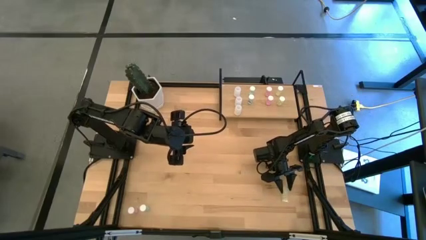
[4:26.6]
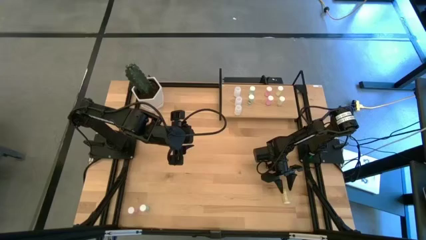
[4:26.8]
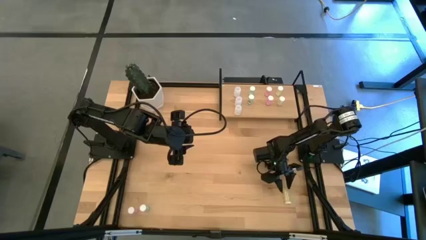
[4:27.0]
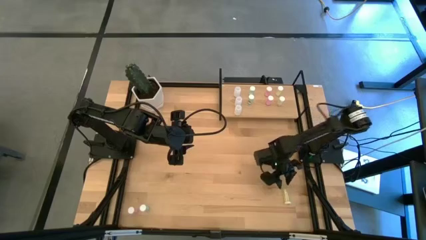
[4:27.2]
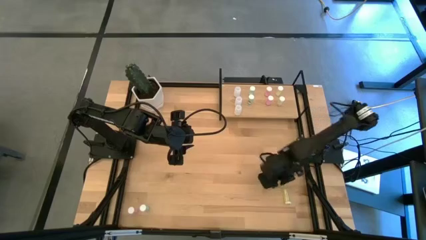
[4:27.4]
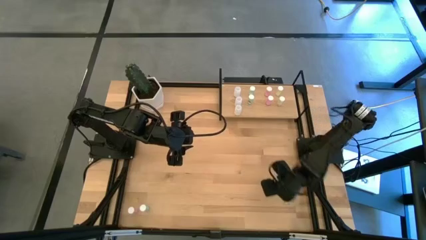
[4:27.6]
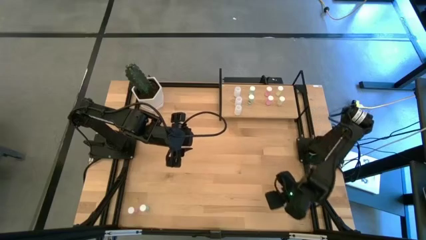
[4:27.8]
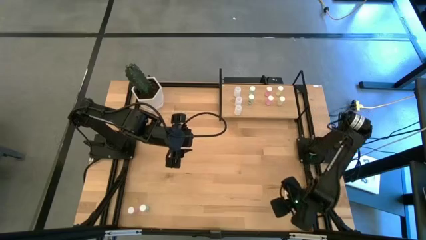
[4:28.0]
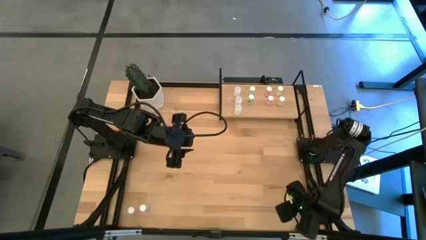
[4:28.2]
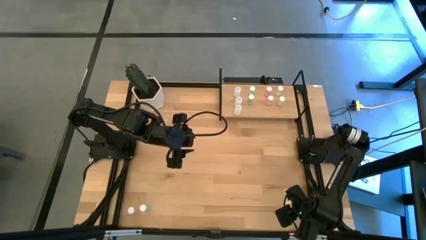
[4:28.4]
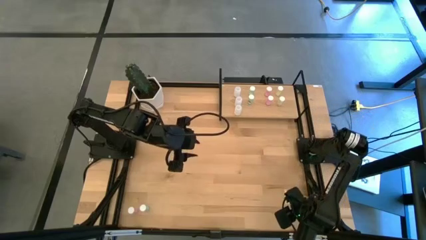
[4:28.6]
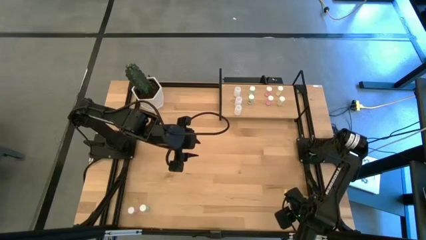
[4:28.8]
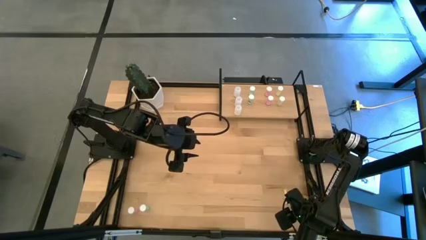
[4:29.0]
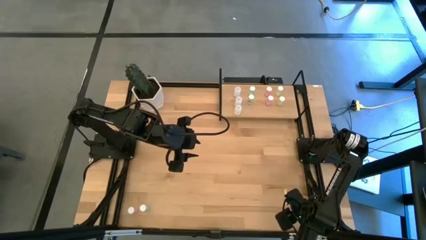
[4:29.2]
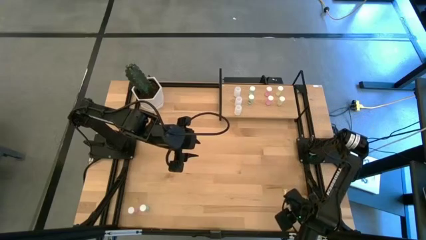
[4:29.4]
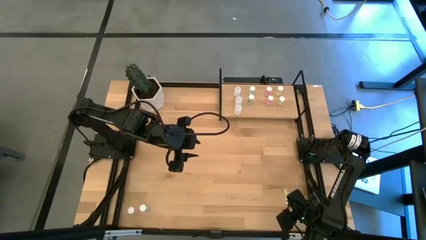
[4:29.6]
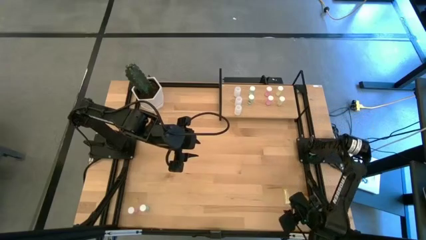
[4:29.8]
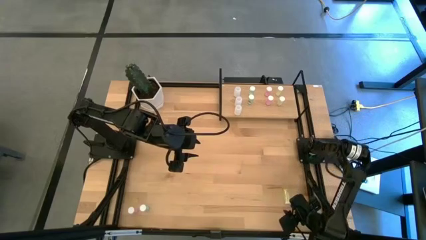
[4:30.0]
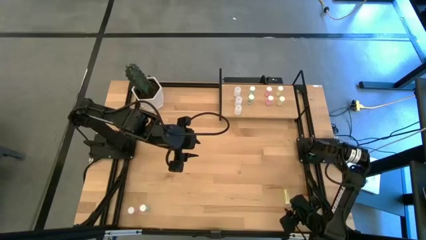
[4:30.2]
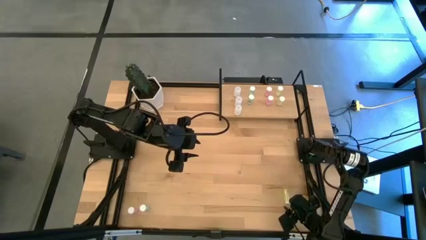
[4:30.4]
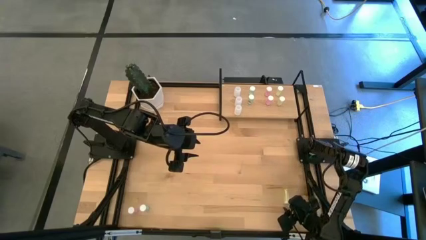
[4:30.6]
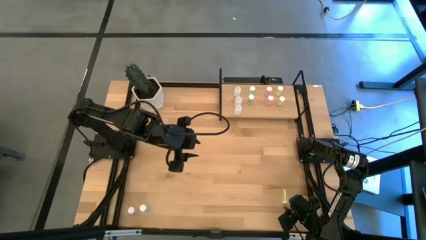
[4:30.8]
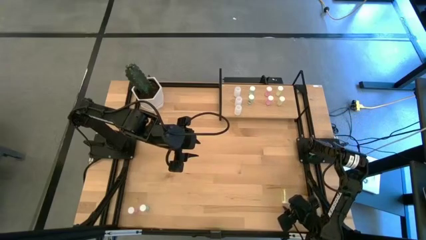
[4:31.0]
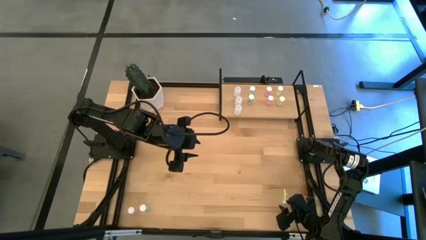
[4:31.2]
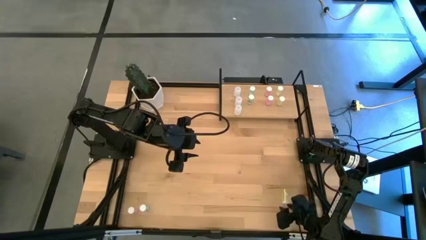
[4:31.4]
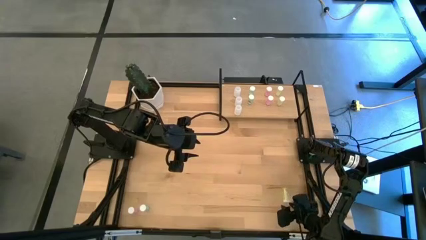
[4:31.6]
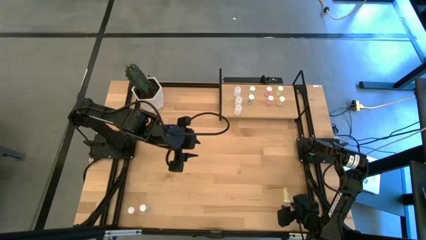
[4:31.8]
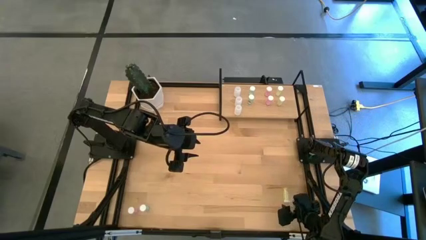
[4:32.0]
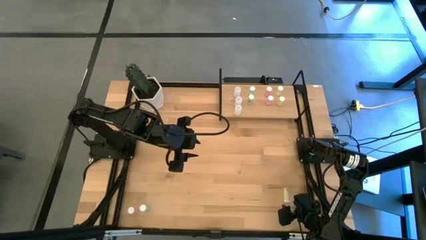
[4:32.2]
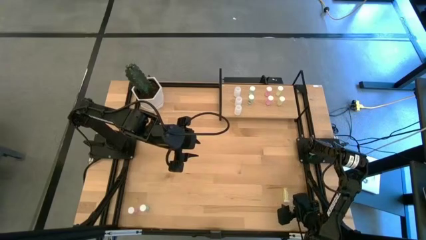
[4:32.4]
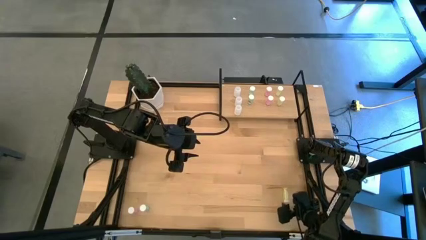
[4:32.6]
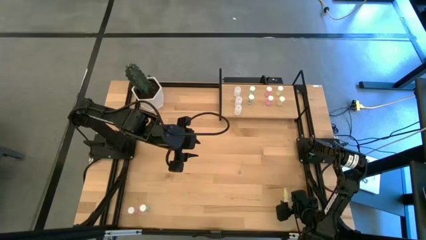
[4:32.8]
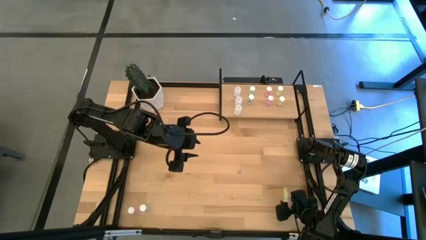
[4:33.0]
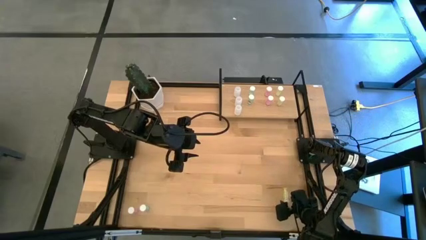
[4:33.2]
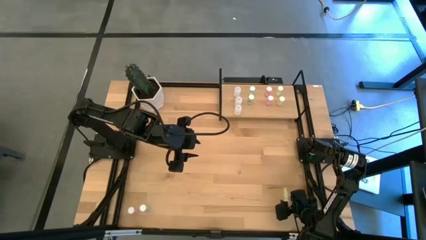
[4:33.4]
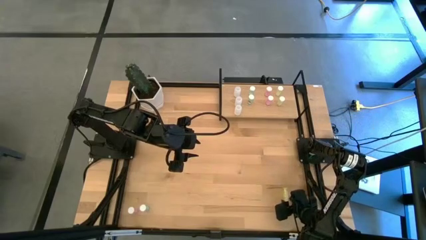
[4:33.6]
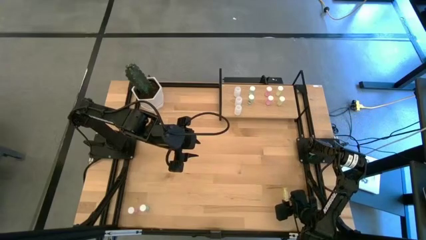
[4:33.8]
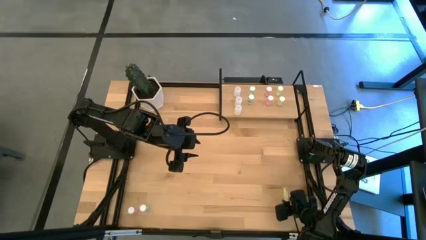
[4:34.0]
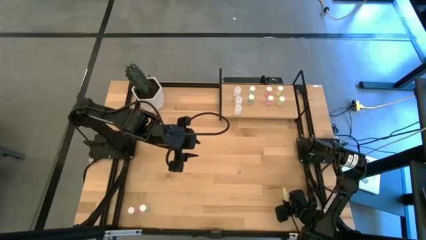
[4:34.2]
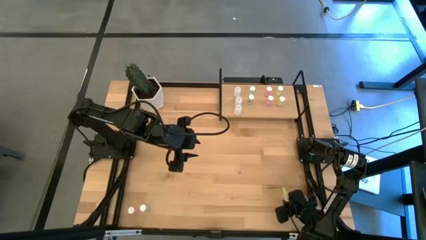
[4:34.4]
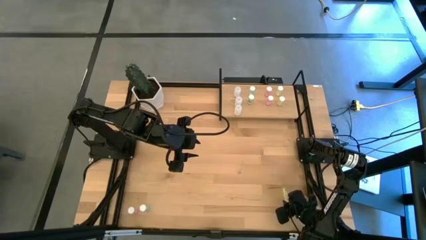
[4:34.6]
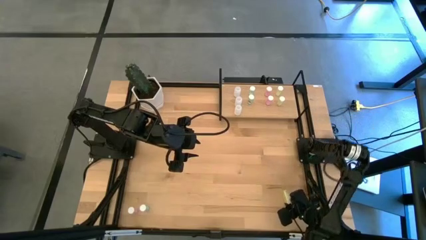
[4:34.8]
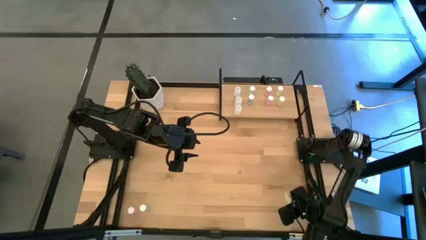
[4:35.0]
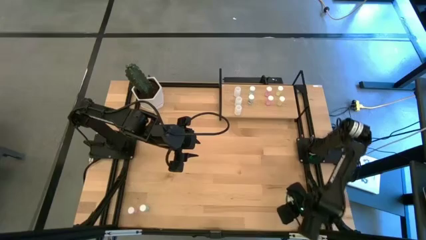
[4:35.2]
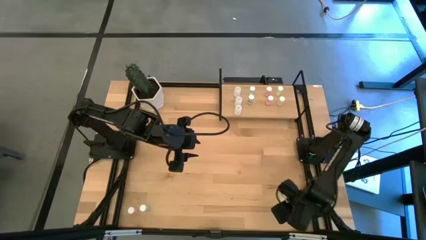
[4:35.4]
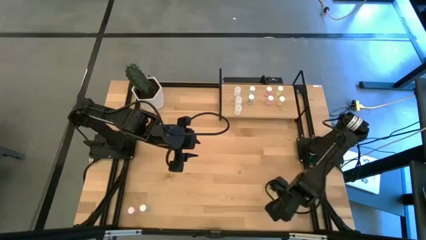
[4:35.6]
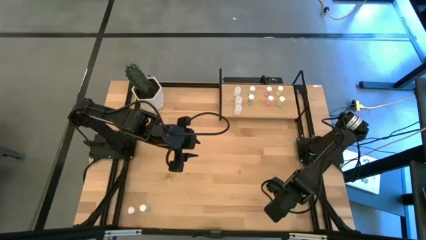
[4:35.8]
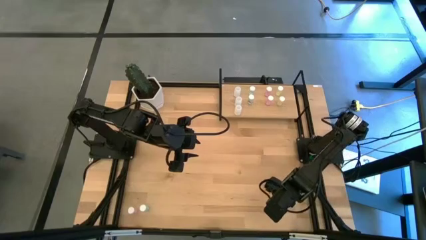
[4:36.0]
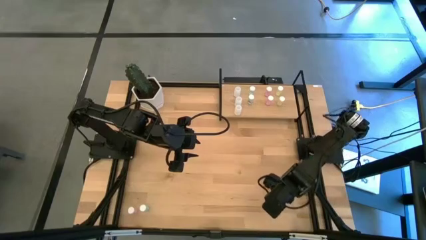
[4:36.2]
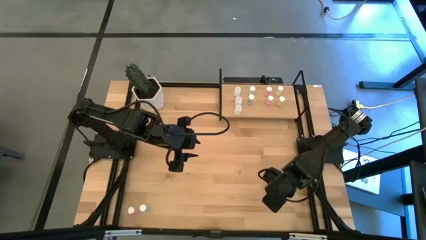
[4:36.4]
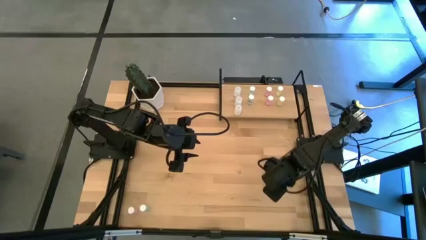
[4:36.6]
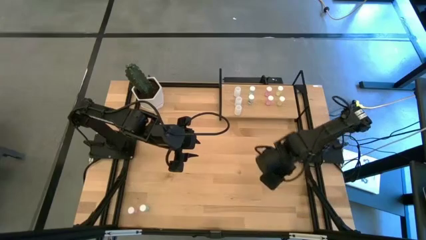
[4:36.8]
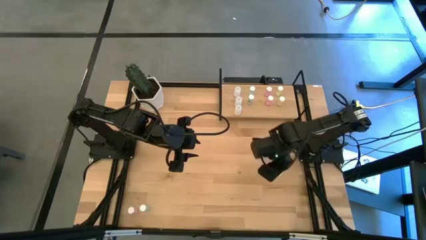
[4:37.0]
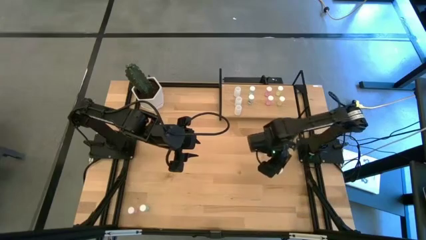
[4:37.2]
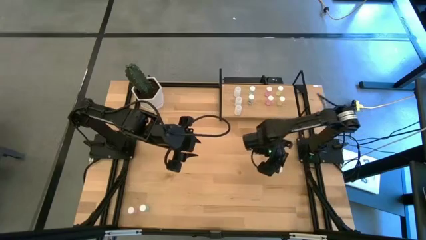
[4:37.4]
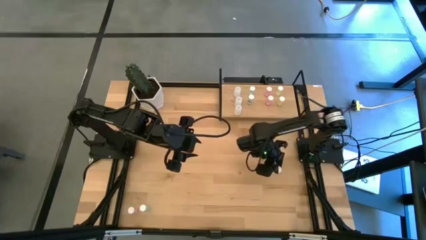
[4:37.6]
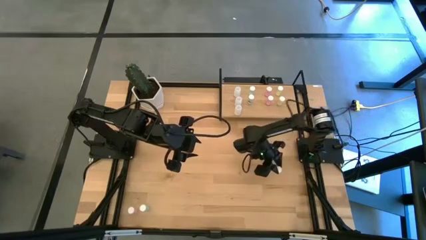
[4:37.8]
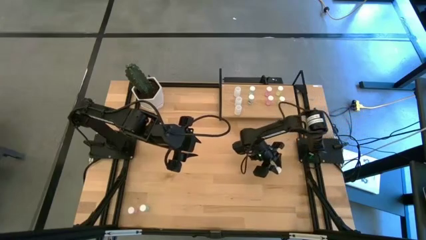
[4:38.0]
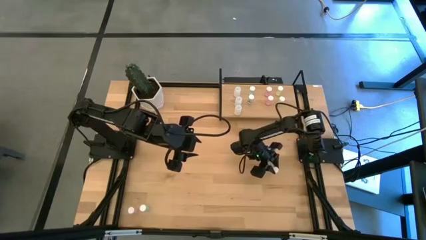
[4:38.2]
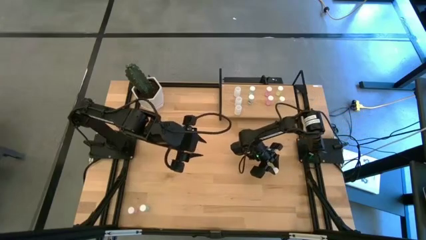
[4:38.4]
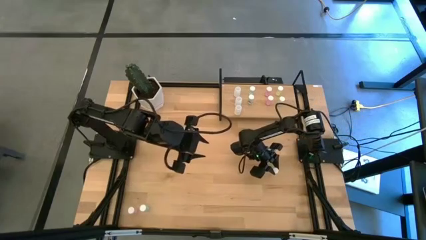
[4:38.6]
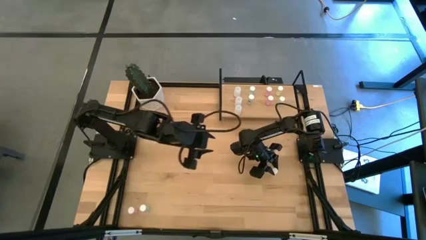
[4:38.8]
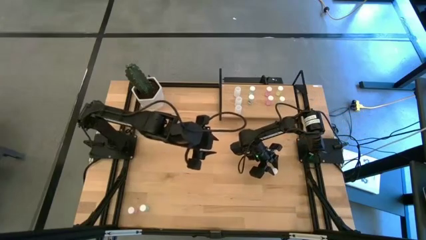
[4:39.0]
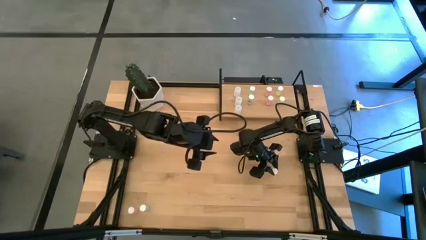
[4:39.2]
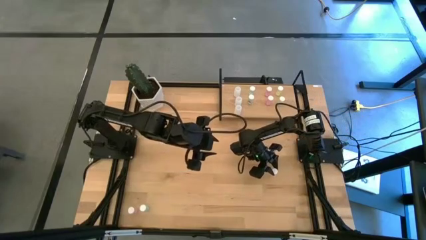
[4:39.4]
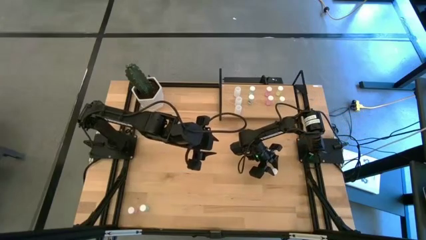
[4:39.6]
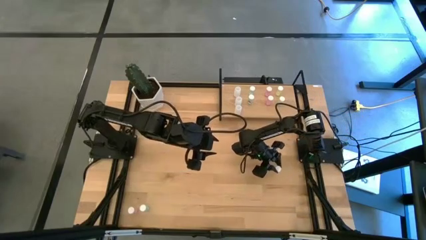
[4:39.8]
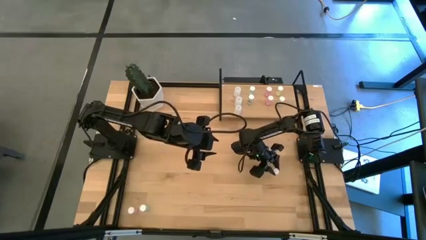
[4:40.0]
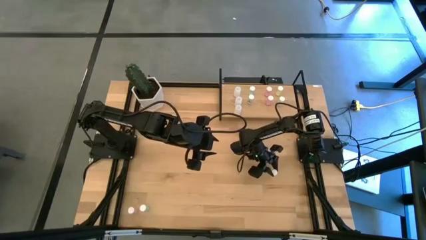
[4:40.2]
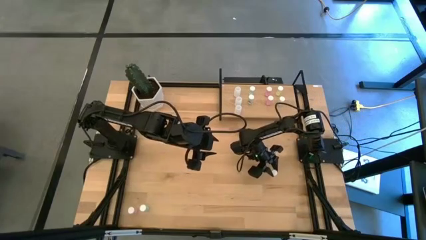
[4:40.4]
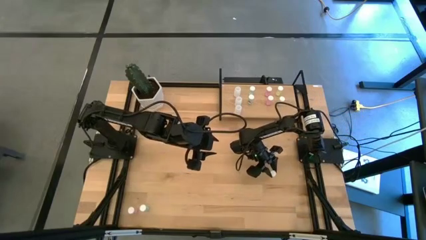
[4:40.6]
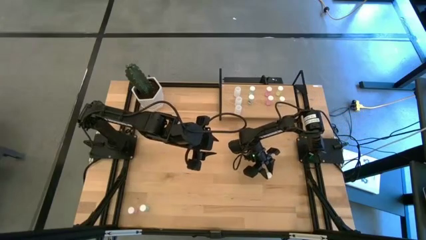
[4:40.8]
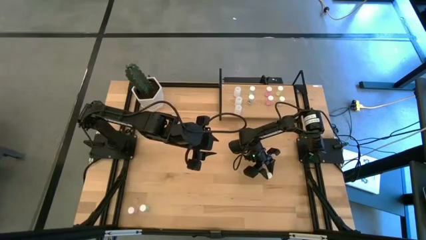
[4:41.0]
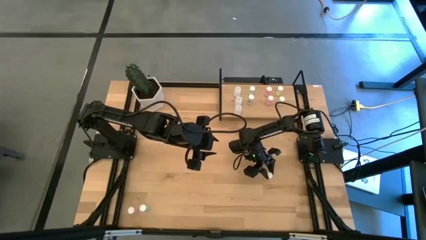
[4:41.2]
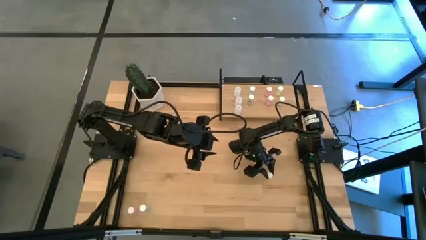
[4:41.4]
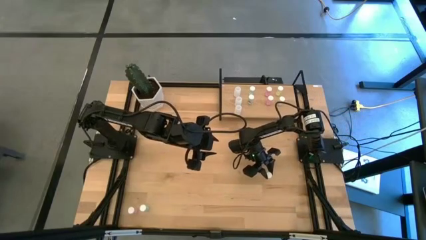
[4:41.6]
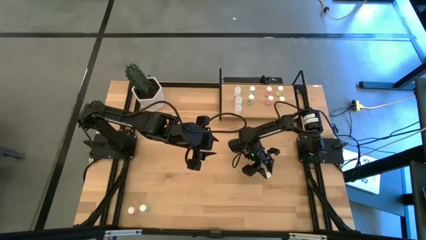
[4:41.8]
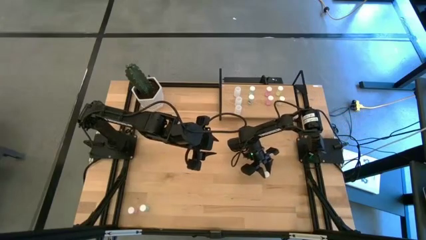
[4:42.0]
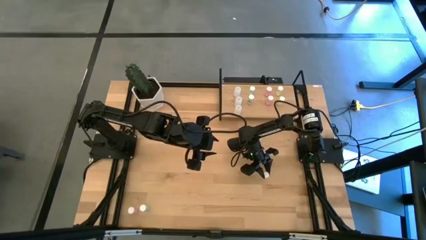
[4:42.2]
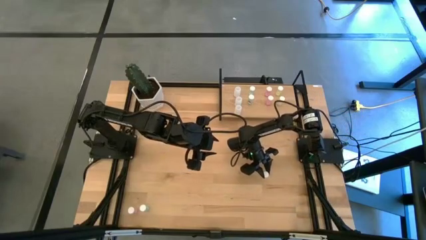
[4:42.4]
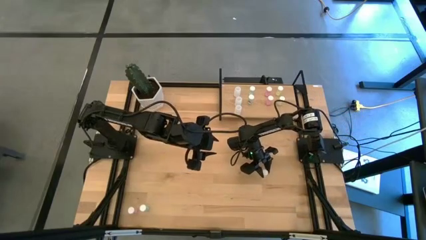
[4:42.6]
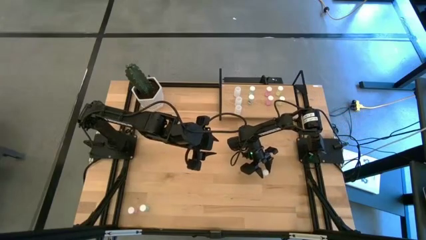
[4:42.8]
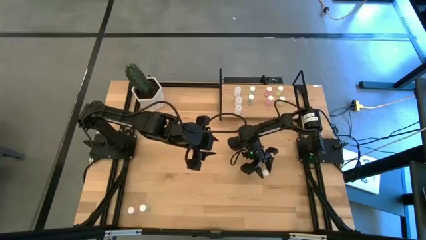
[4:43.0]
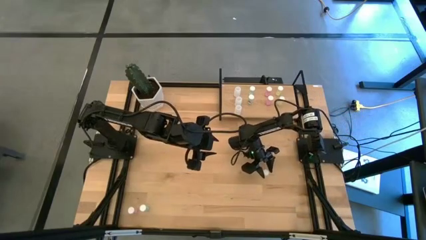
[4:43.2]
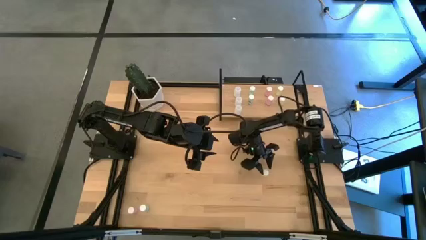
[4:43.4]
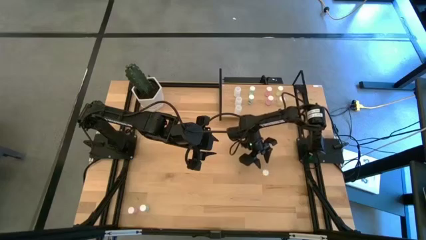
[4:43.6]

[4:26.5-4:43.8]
Task: Pick and place medicine bottles onto shelf by color
Put the yellow pill bottle on the shelf aligned with the other yellow pill bottles
